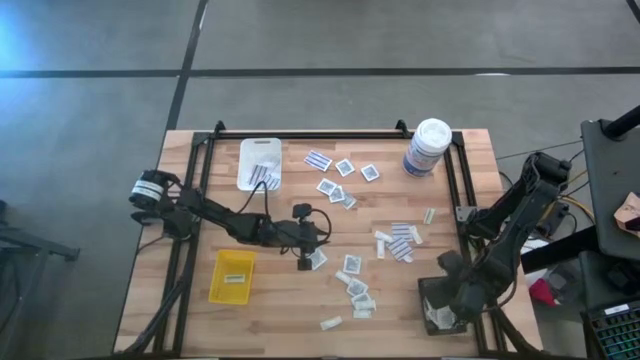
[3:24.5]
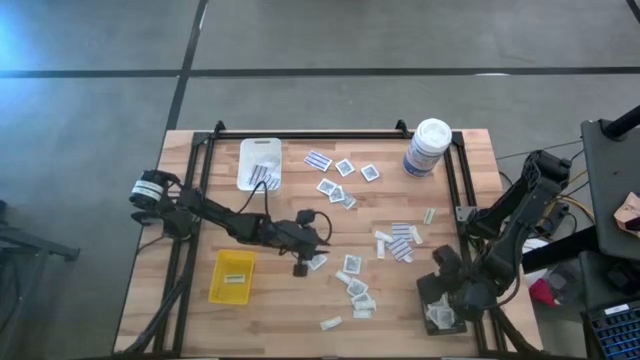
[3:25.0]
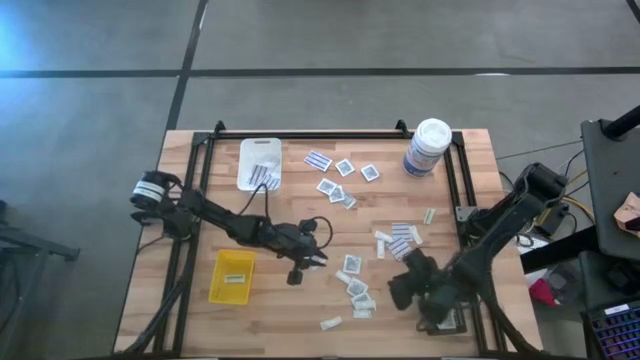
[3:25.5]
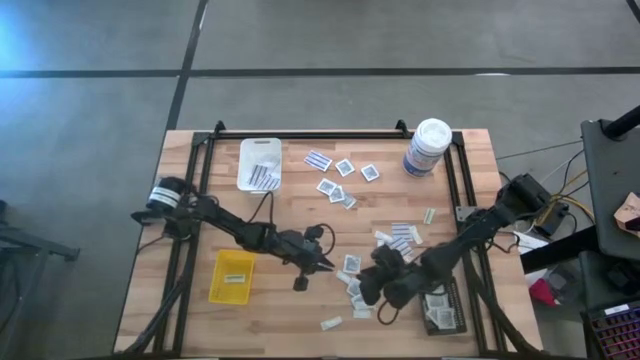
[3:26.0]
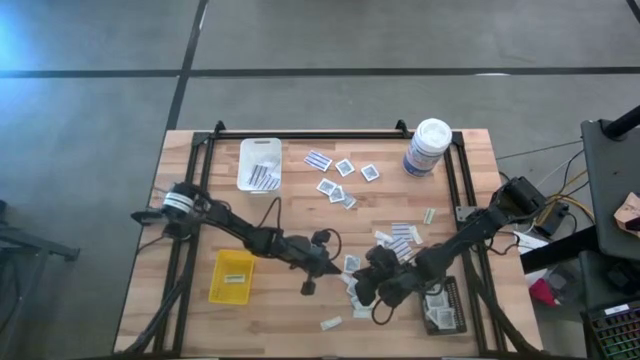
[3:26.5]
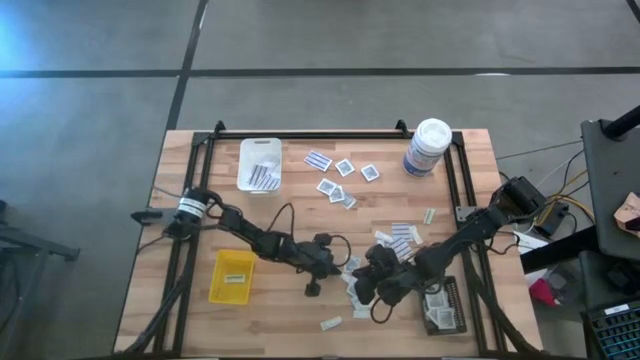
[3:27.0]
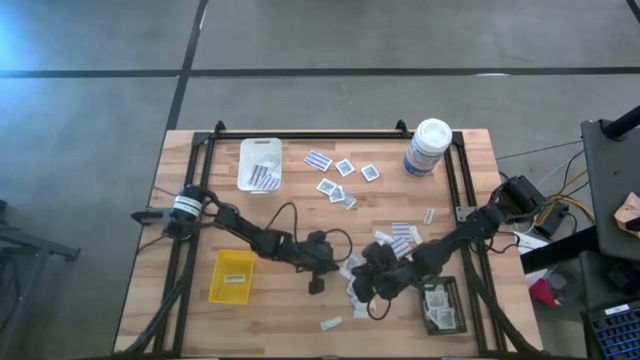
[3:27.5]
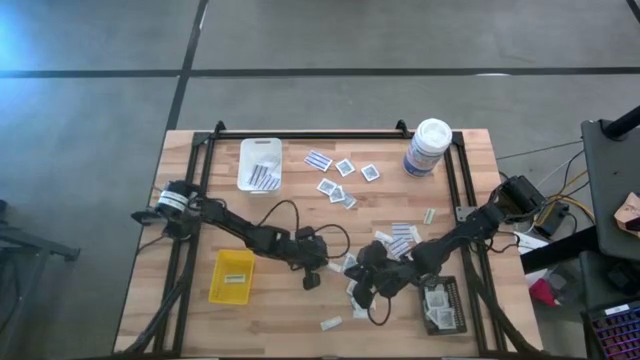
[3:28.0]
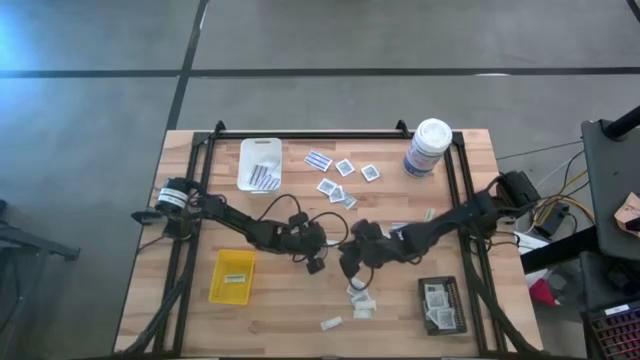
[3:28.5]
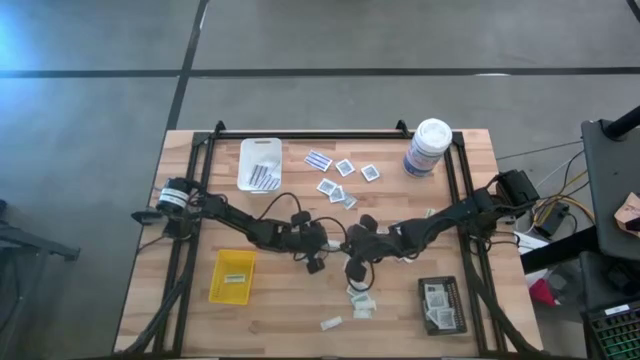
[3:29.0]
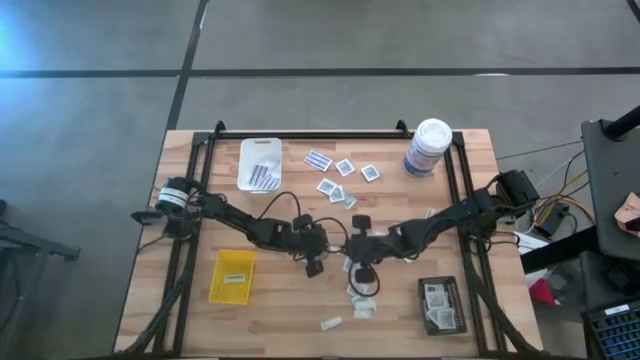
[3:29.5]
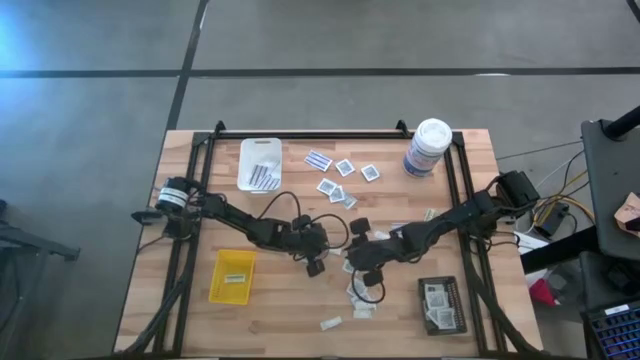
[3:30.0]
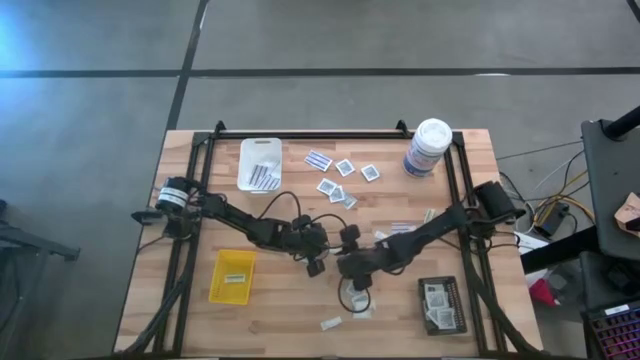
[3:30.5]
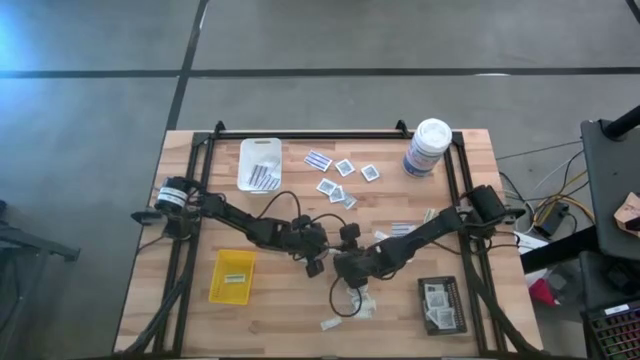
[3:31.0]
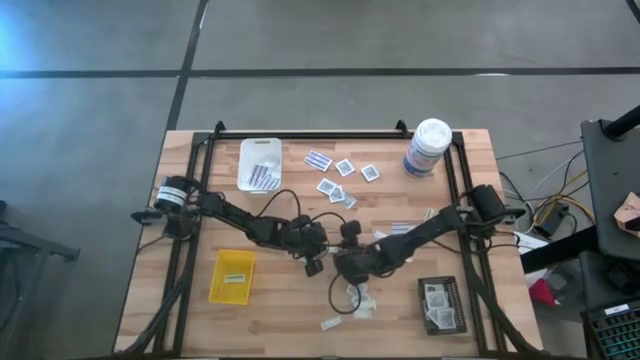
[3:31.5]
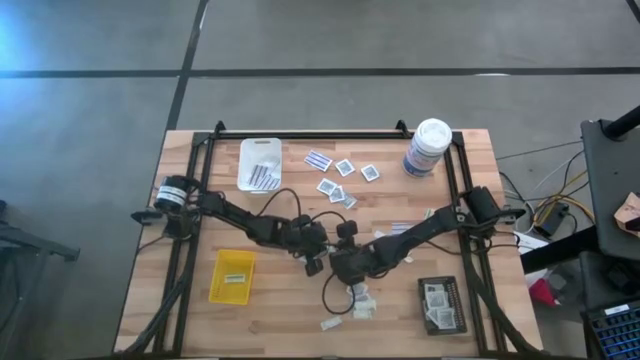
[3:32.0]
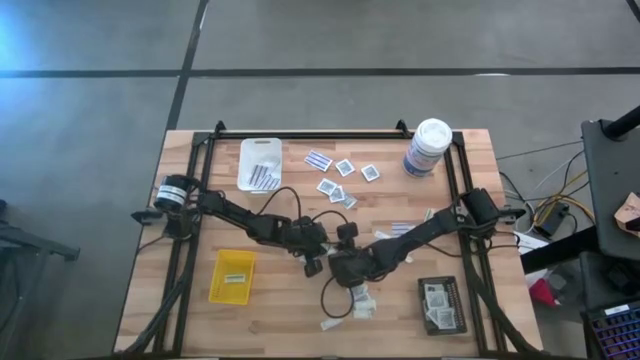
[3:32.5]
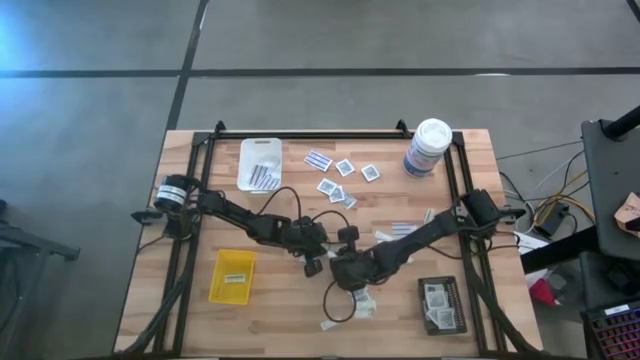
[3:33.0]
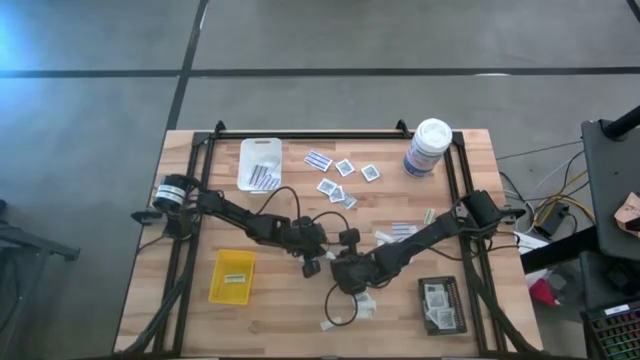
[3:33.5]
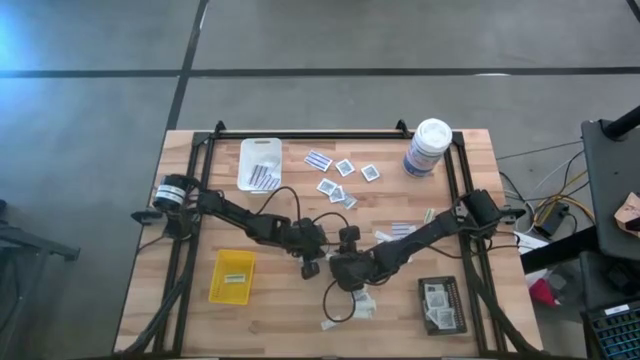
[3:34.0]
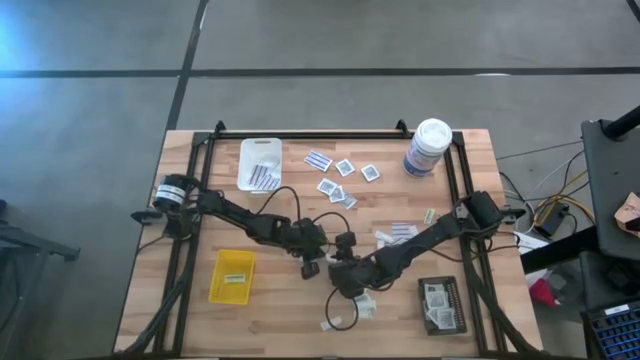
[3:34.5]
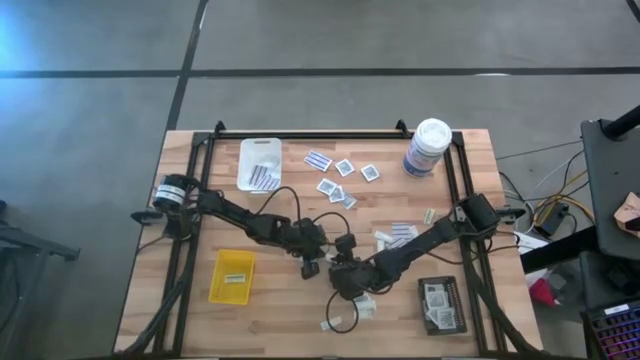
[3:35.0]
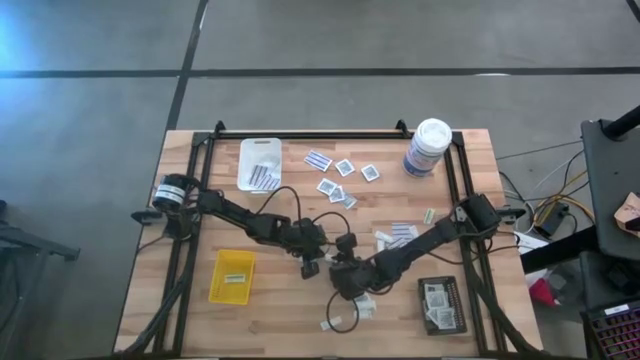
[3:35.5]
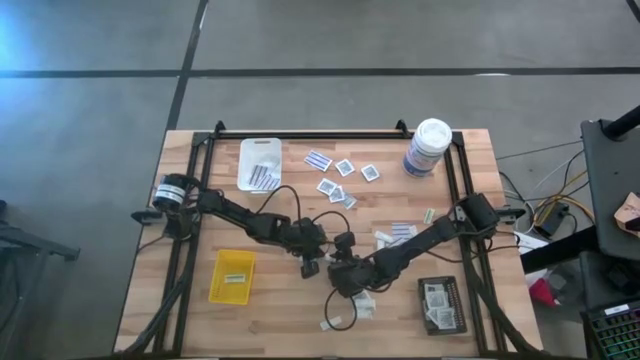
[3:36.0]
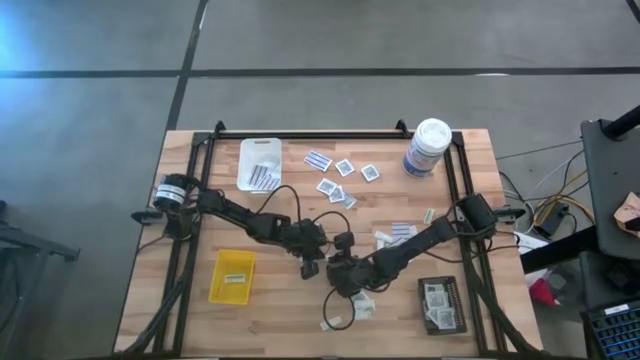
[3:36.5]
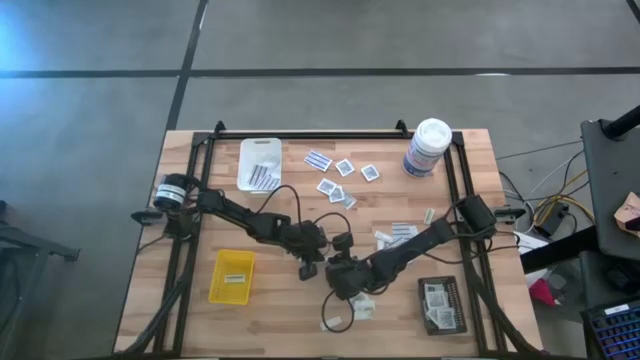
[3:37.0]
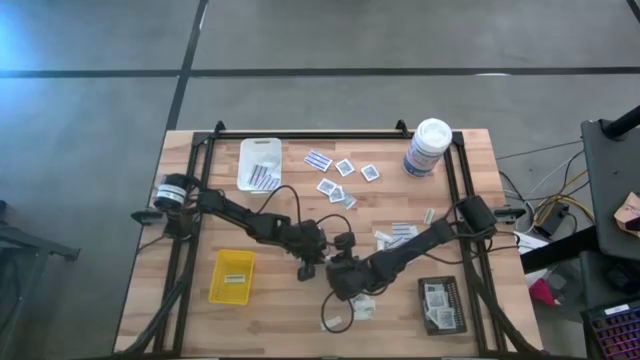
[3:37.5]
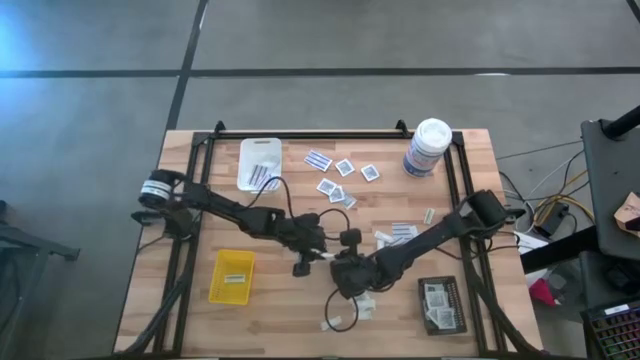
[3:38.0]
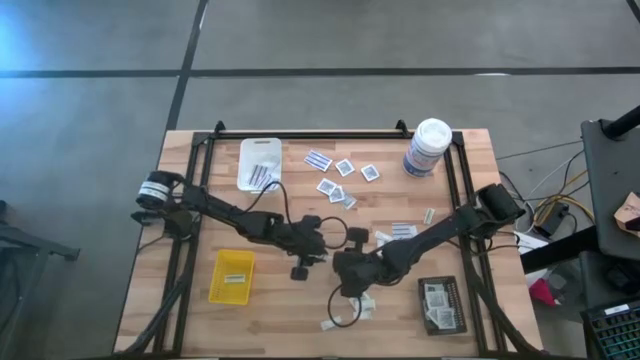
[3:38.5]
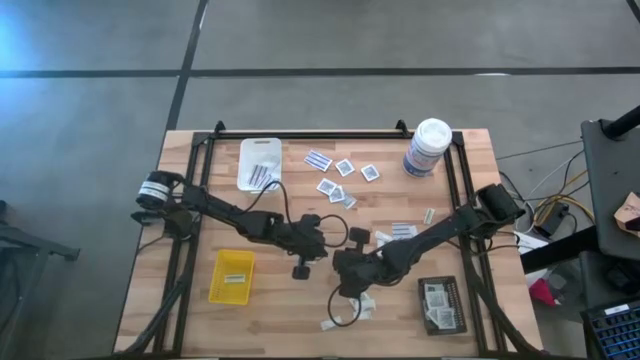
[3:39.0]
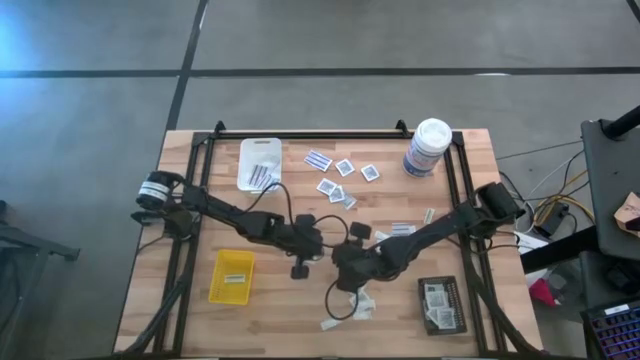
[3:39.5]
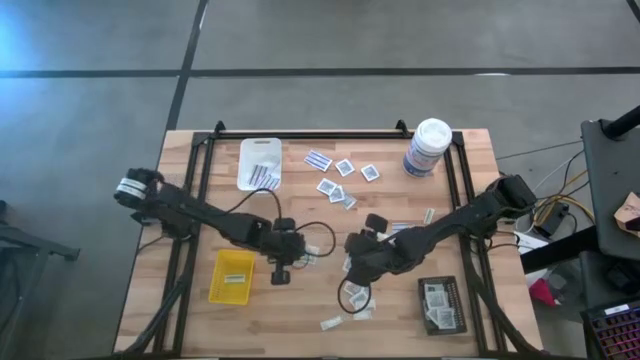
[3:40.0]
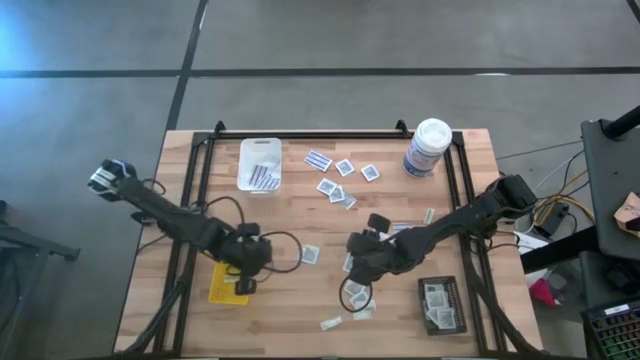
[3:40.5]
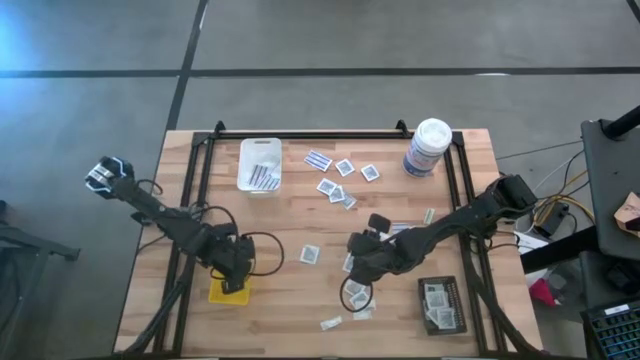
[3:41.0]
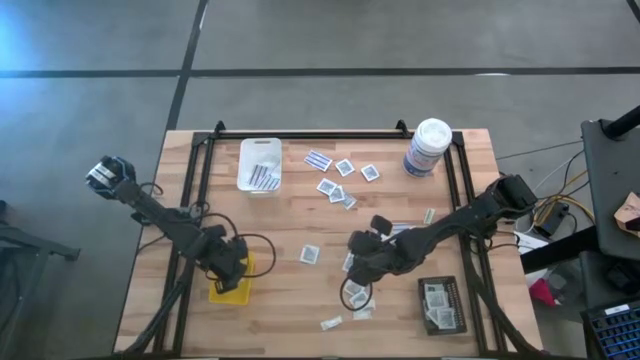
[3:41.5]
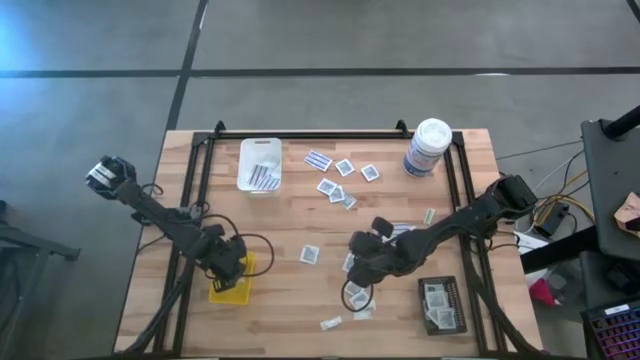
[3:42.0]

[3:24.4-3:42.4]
Task: Pick & Place First Aid Supplies
Put the green bandage into the yellow bin

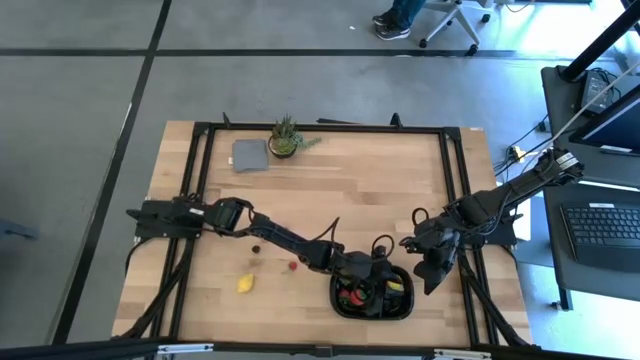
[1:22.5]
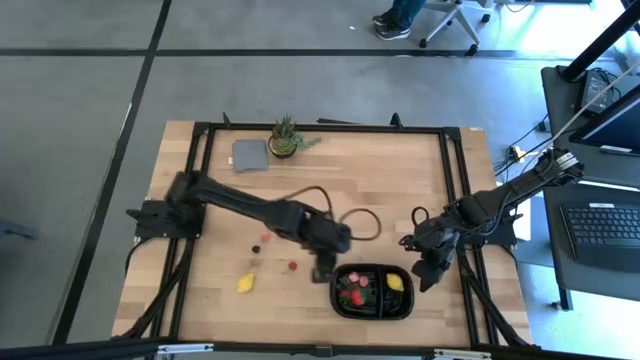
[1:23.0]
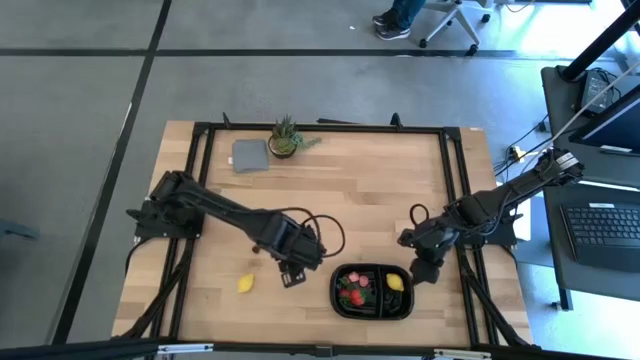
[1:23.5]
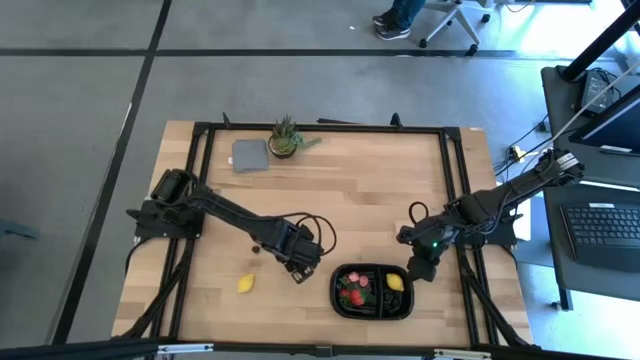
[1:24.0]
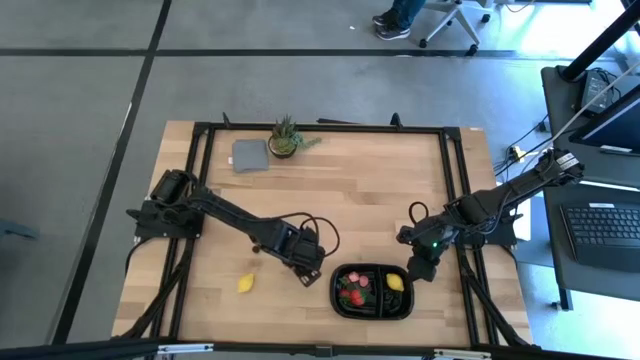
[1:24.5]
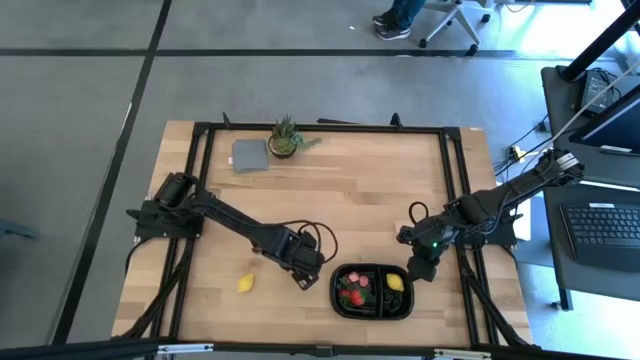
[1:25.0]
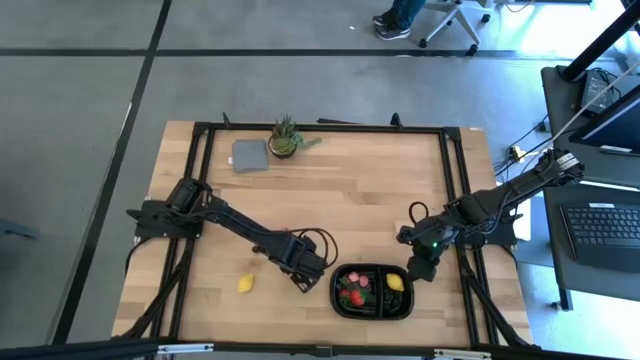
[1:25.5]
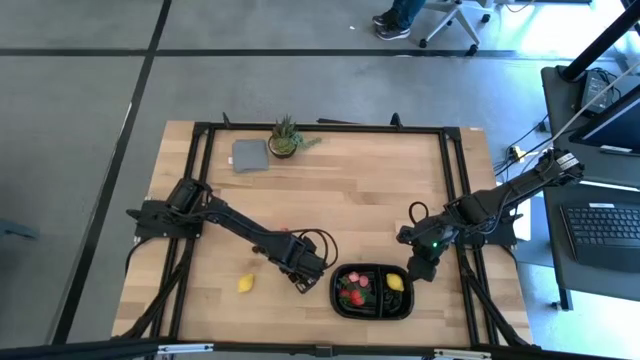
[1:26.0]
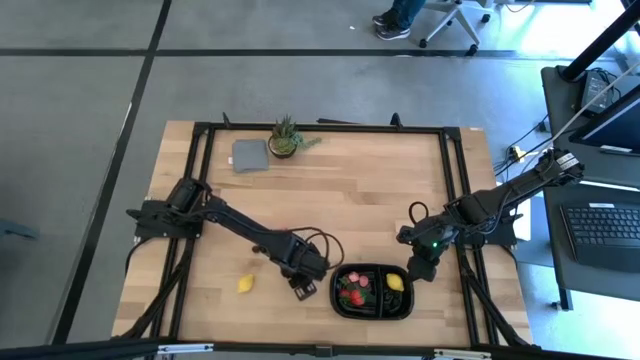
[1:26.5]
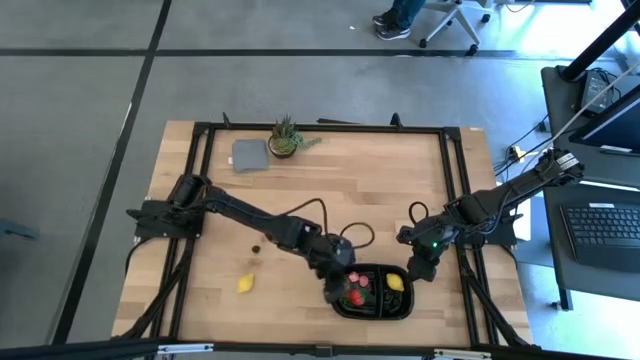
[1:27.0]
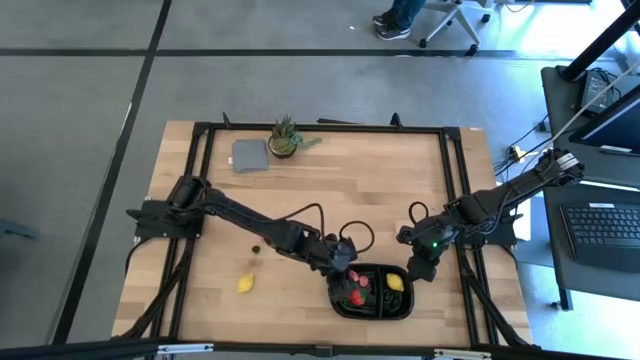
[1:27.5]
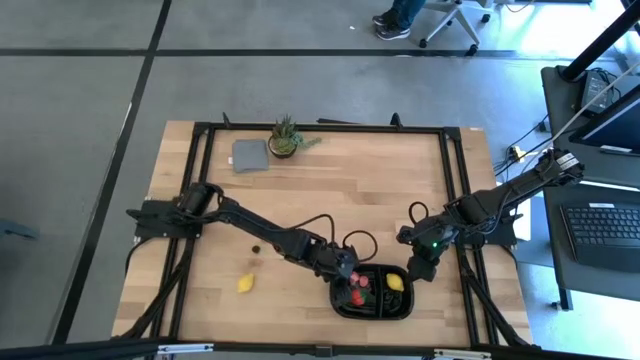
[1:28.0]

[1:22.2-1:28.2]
Task: Pick and placing Produce into tupperware
Put the red strawberry into the black bin
